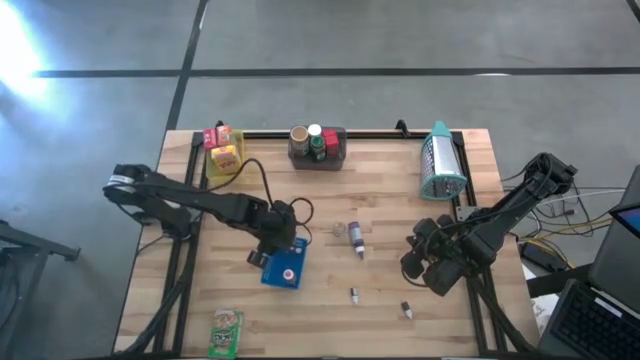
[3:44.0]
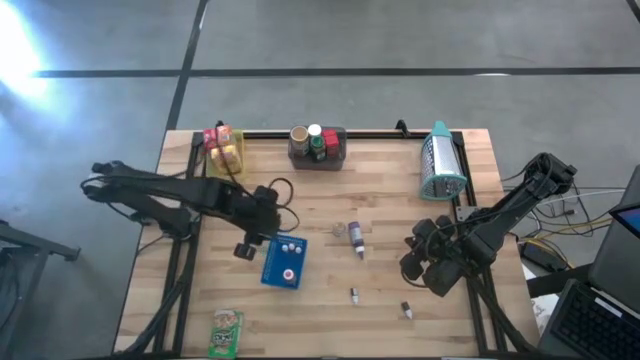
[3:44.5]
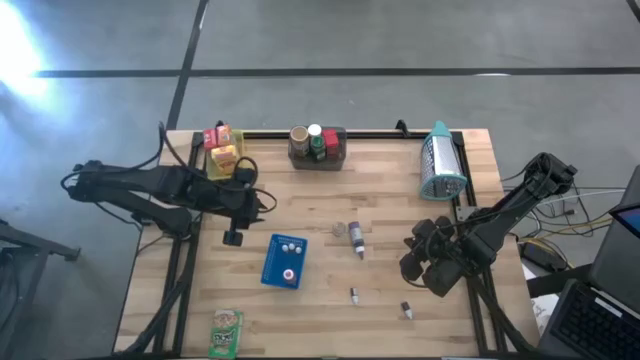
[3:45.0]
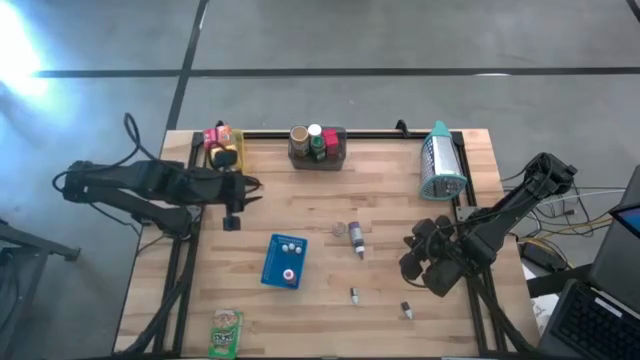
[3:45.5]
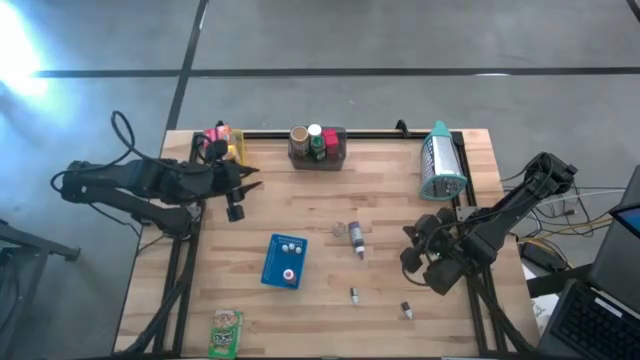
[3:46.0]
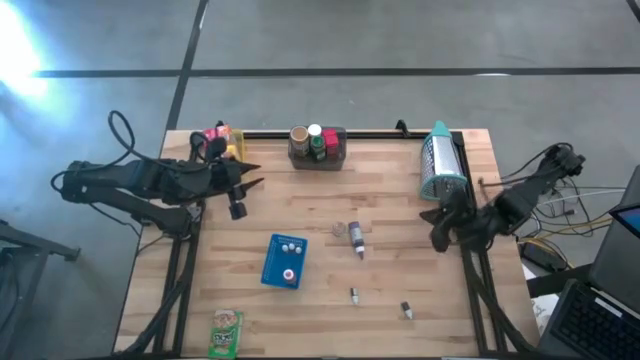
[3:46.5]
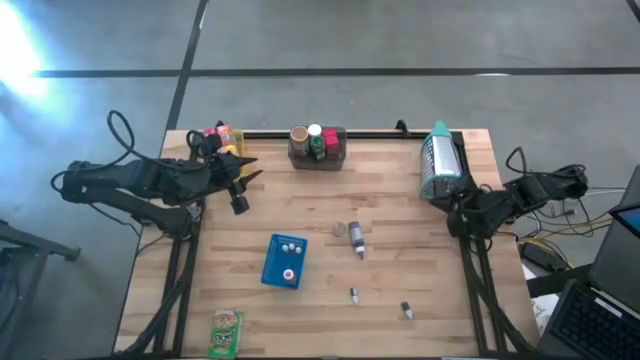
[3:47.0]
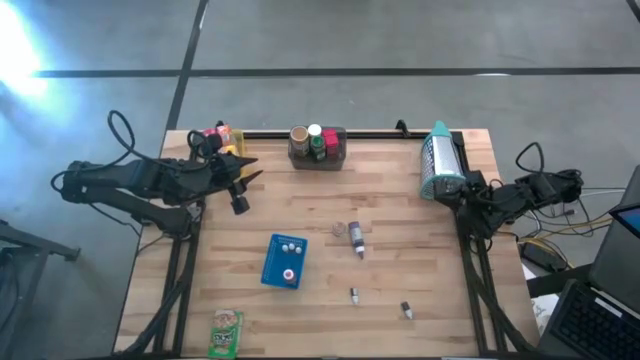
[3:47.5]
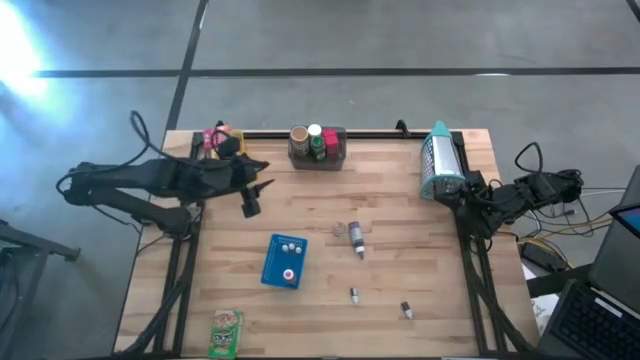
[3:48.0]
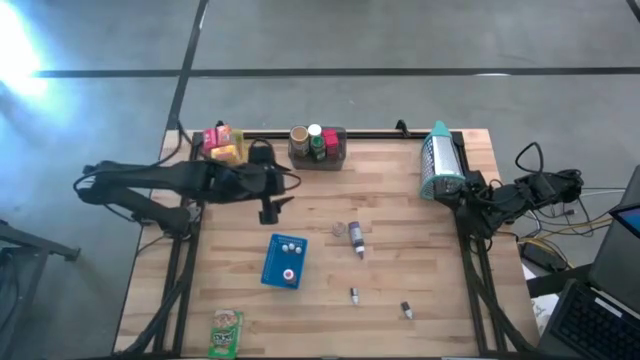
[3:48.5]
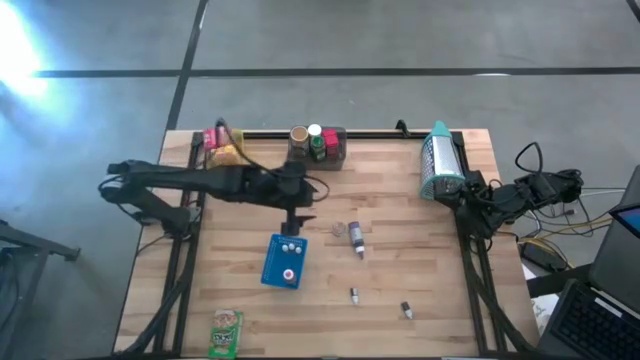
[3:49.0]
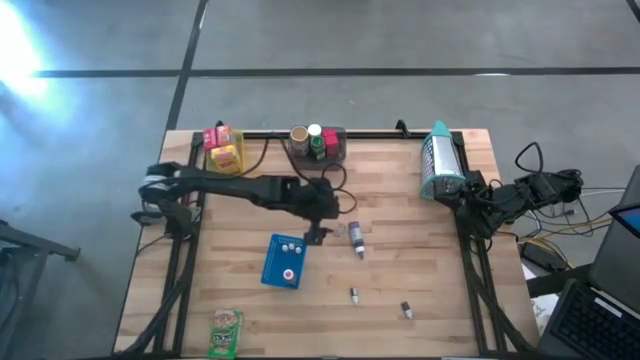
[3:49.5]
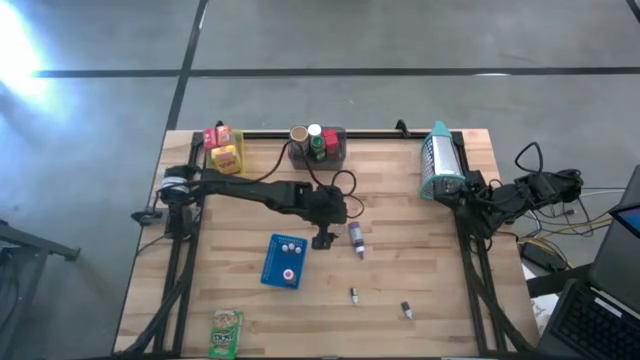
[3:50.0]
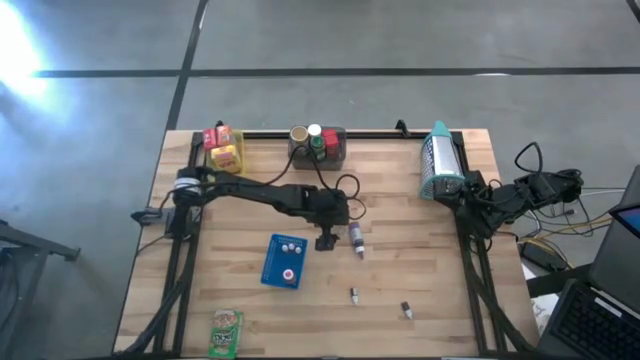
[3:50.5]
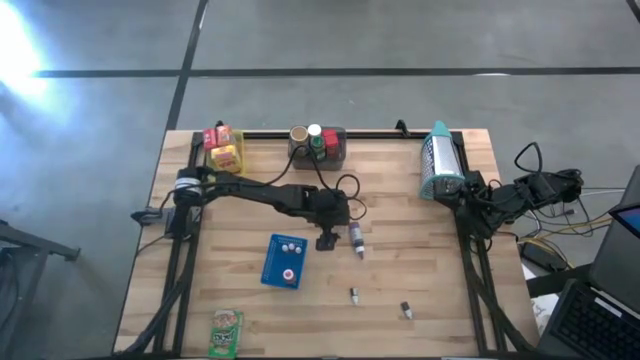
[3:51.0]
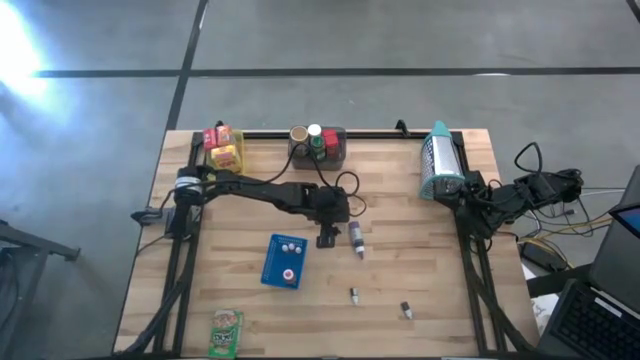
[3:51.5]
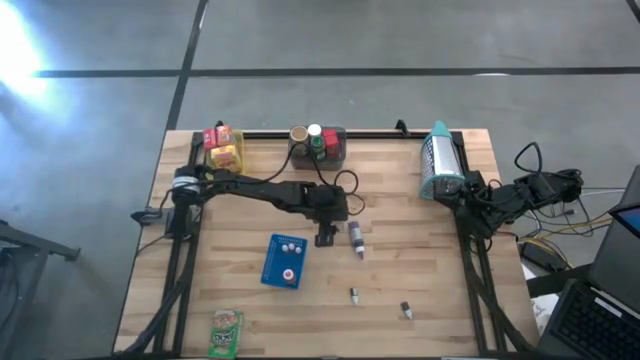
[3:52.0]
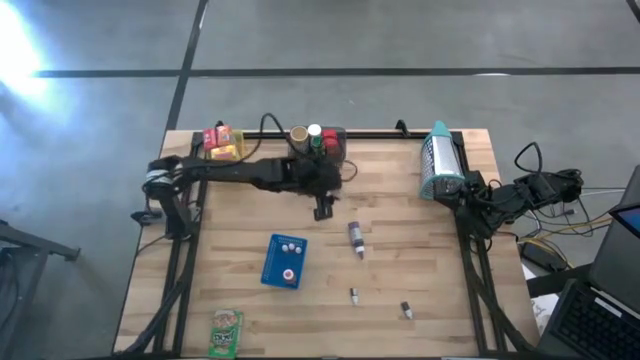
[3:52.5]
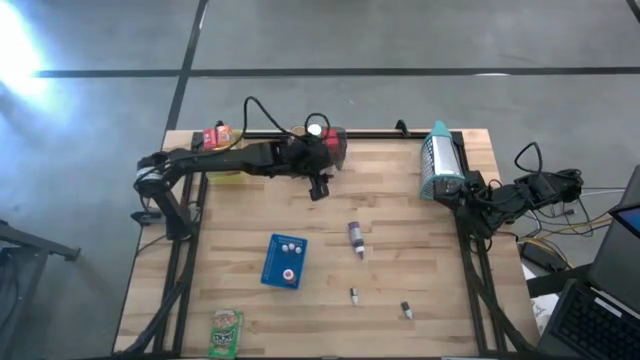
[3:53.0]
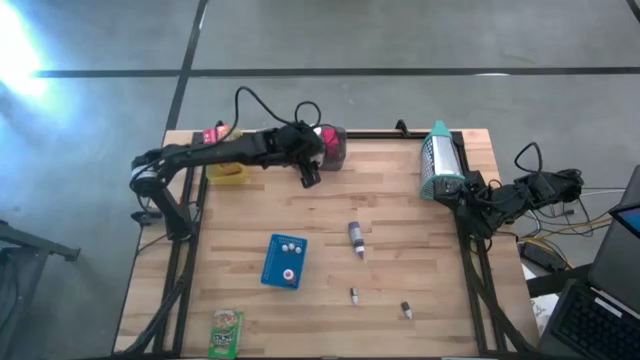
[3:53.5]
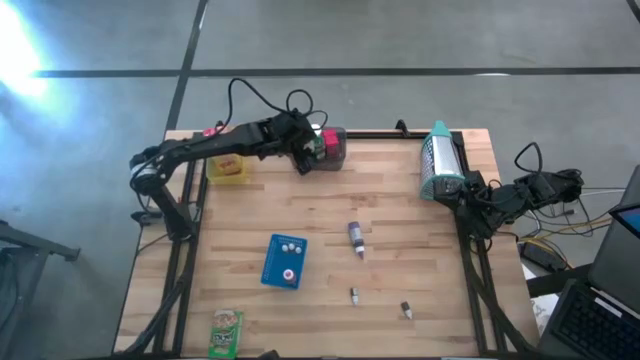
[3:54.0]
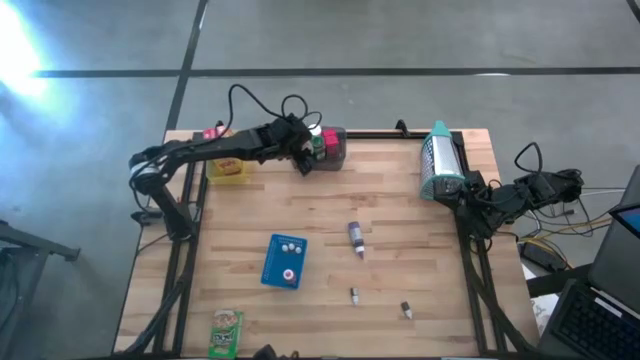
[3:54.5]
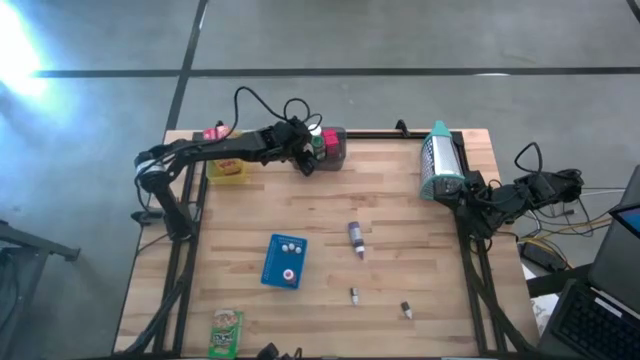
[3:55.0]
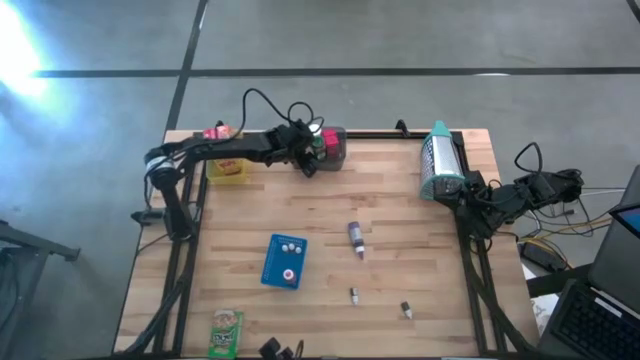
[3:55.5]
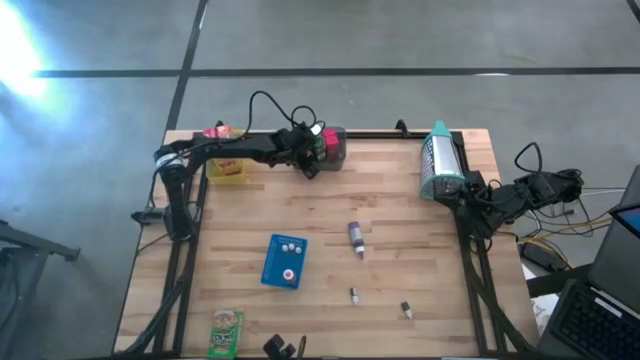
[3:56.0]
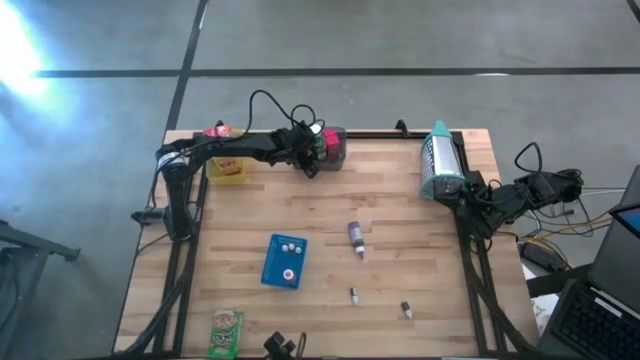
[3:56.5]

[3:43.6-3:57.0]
Task: Pick & Place Kitchen Items
Put the brown spice bottle into the black bin

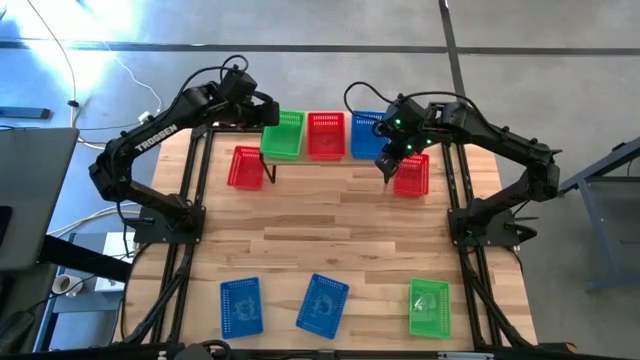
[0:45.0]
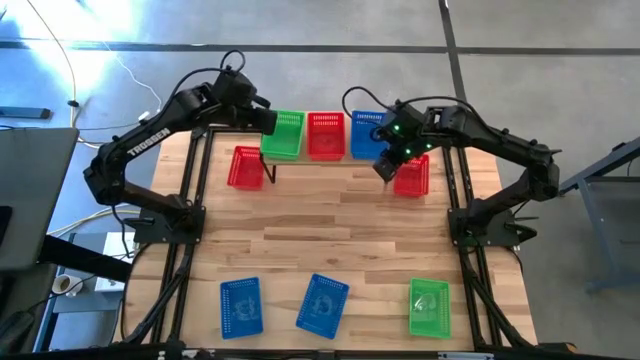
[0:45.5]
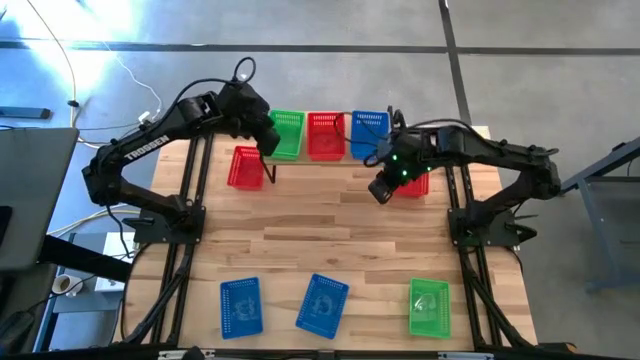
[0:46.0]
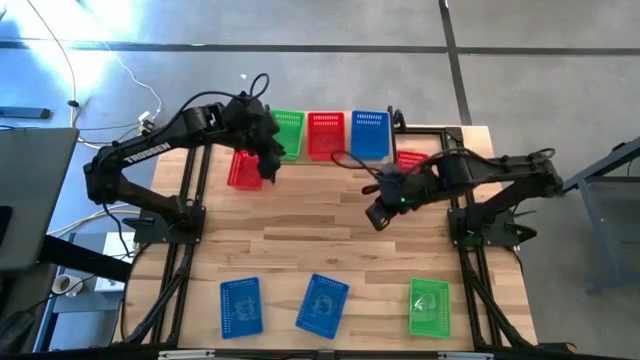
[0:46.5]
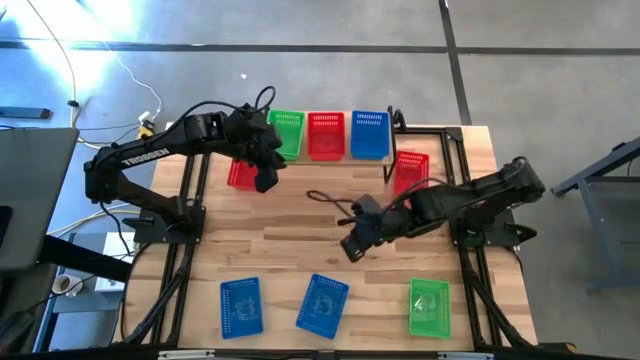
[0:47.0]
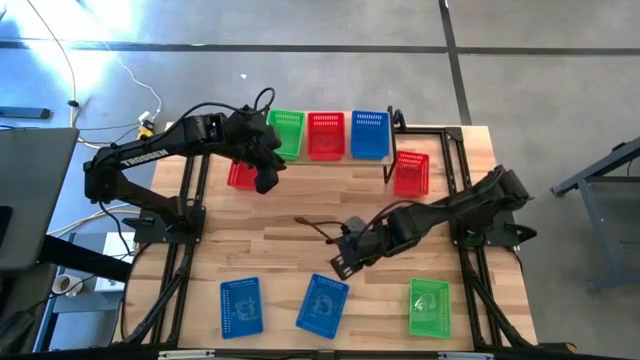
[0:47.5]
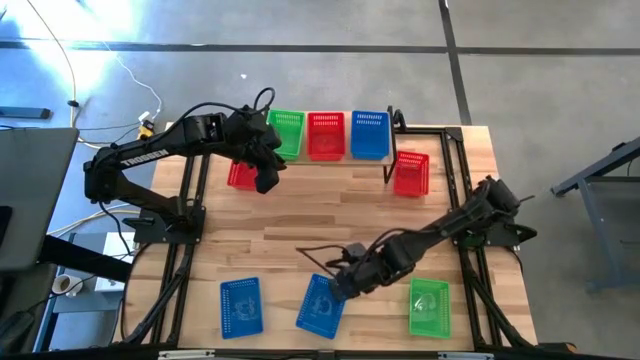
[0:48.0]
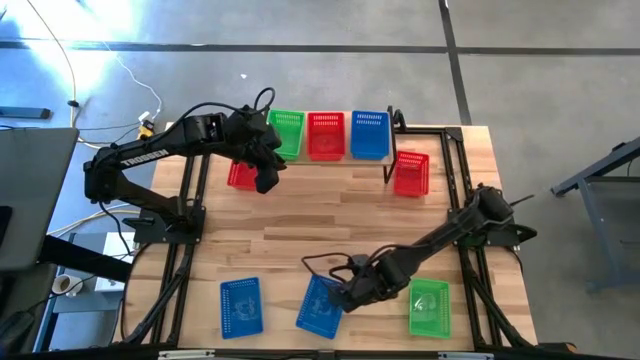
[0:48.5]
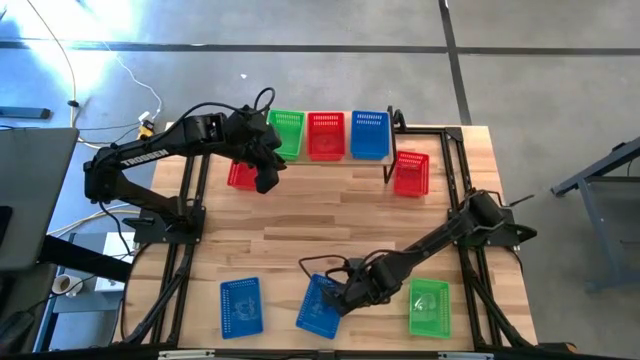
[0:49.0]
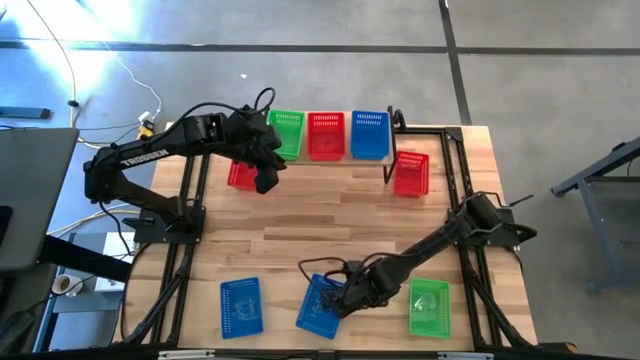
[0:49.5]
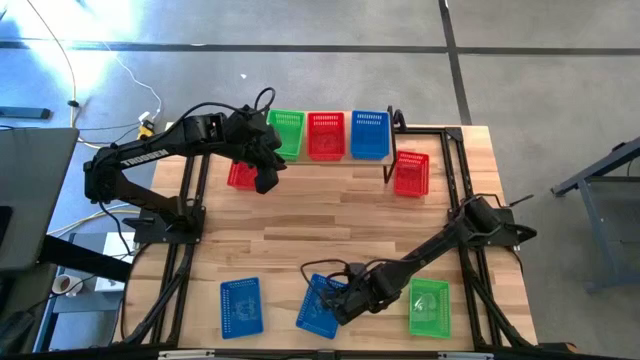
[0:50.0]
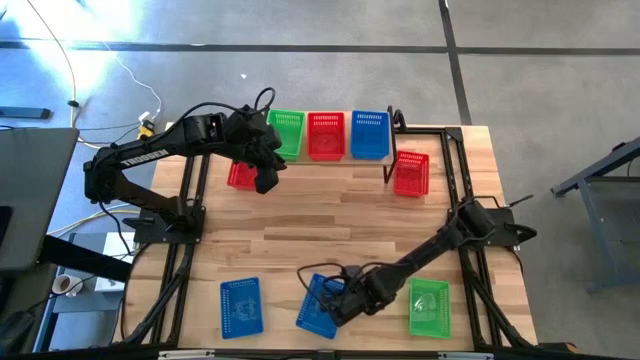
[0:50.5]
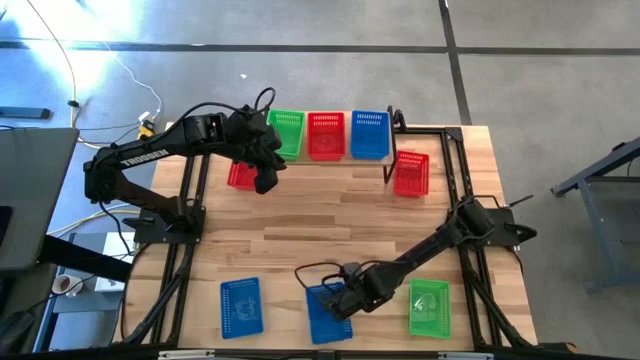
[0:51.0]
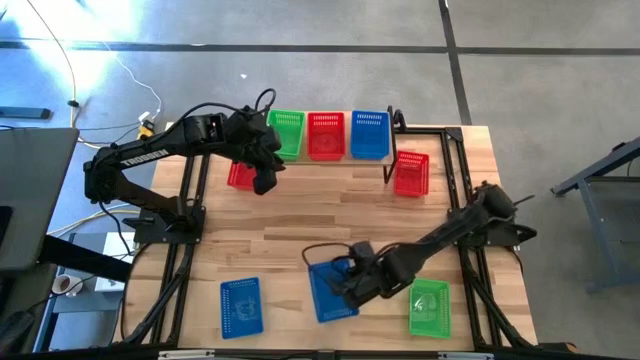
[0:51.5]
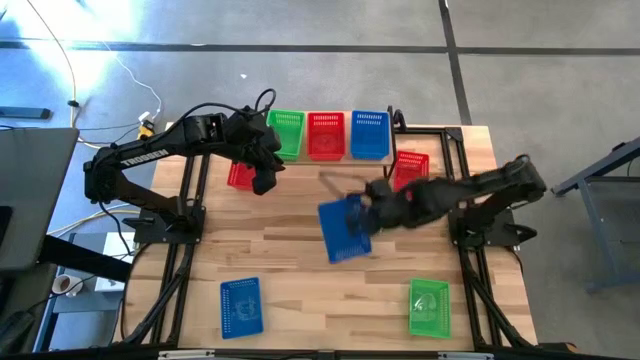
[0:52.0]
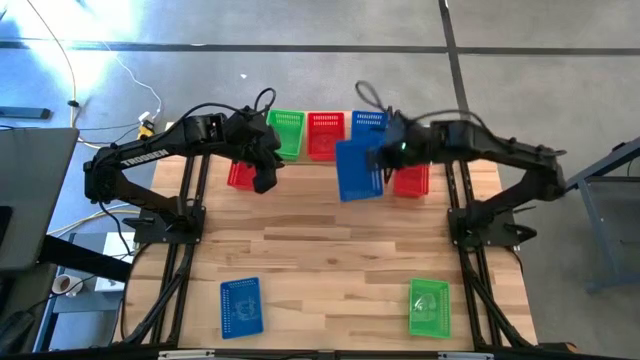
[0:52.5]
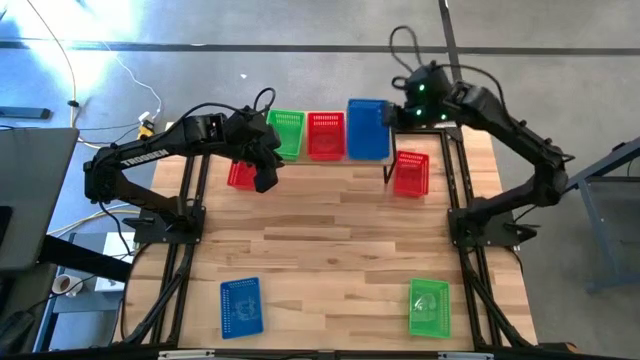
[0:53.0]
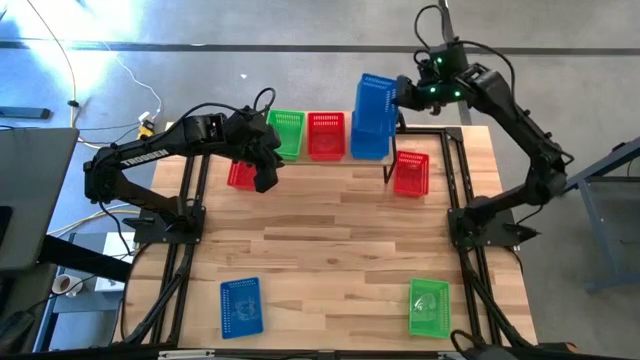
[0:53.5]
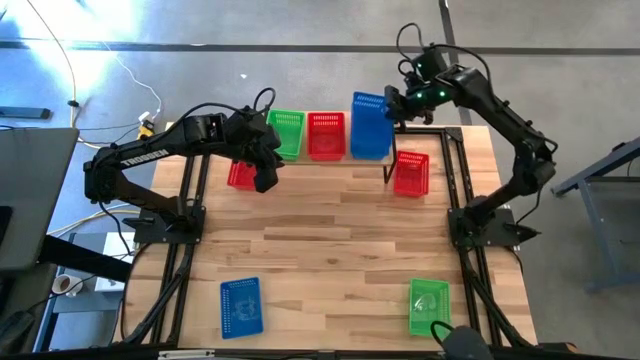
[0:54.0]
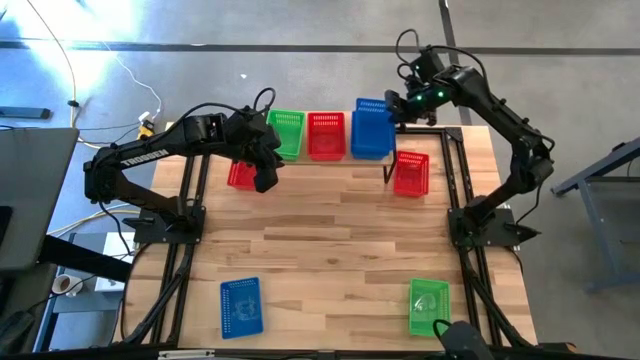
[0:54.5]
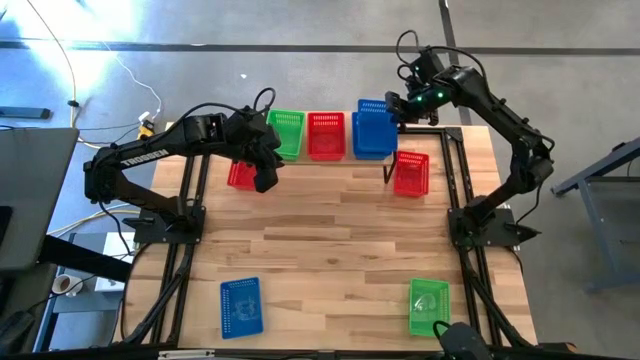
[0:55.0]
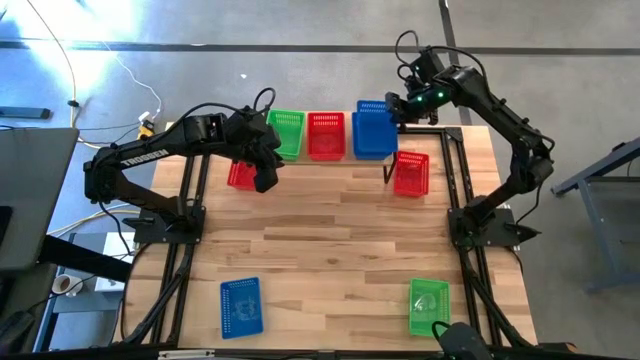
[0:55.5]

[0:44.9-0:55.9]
Task: Stack baskets on shelf by color
Stack the right blue bin on top of the blue bin on the shelf
